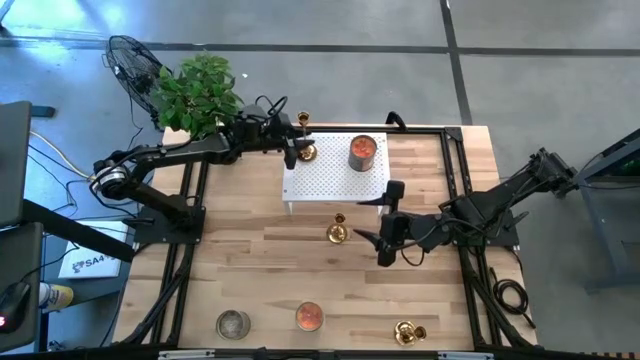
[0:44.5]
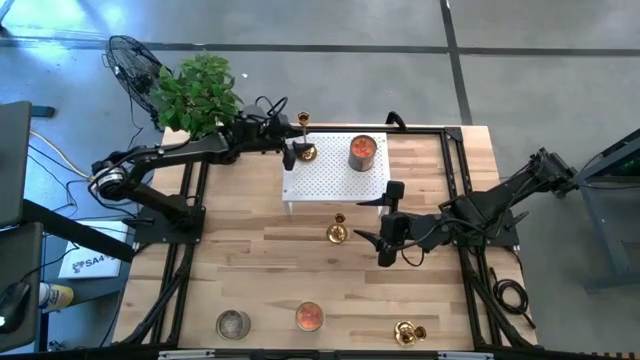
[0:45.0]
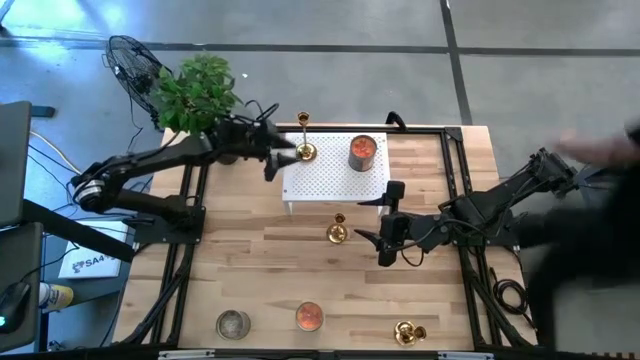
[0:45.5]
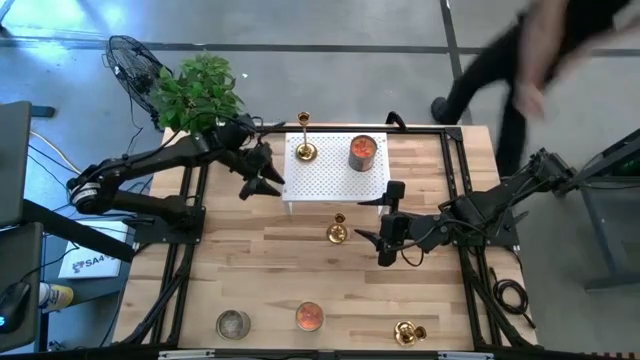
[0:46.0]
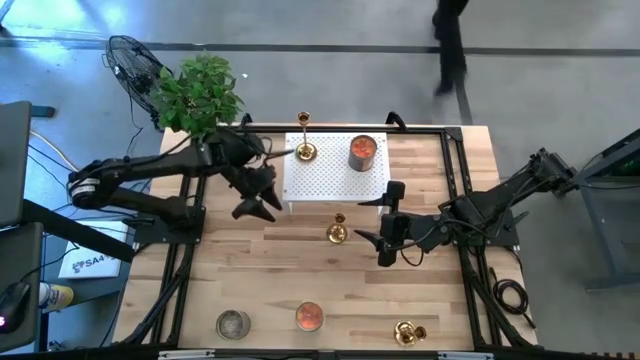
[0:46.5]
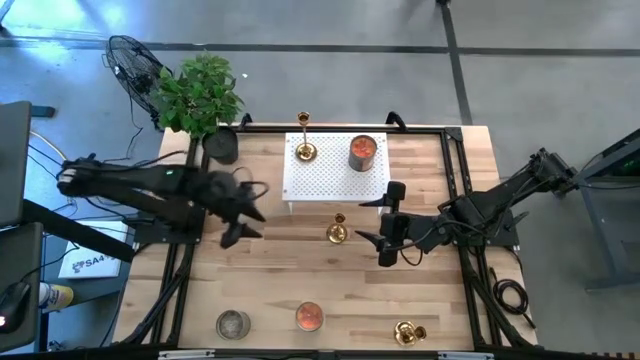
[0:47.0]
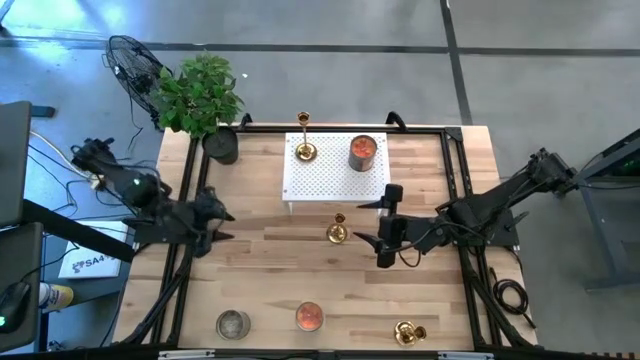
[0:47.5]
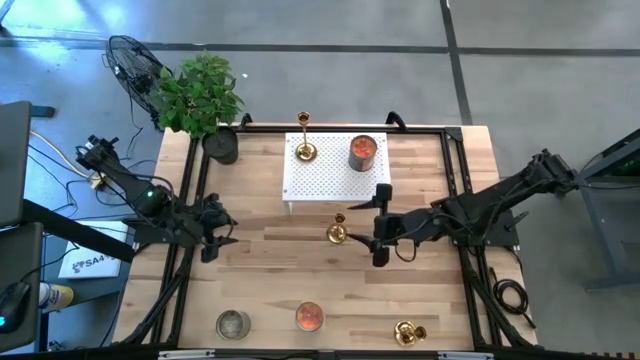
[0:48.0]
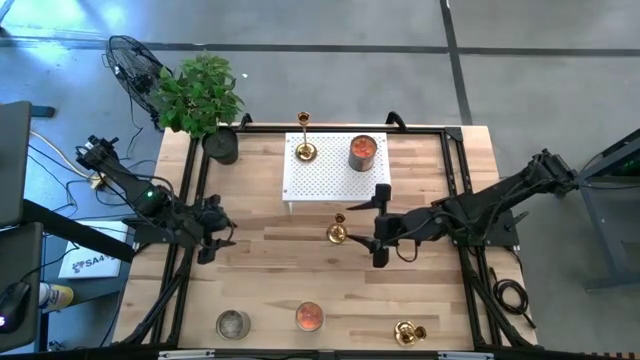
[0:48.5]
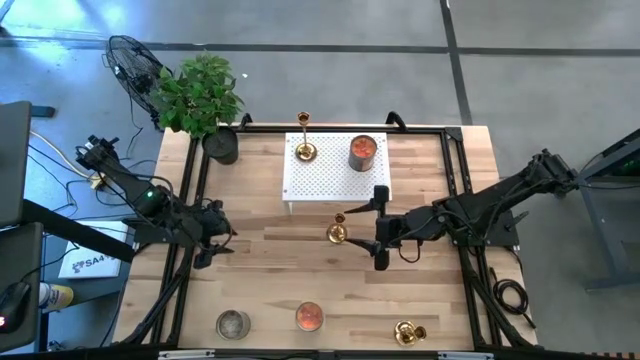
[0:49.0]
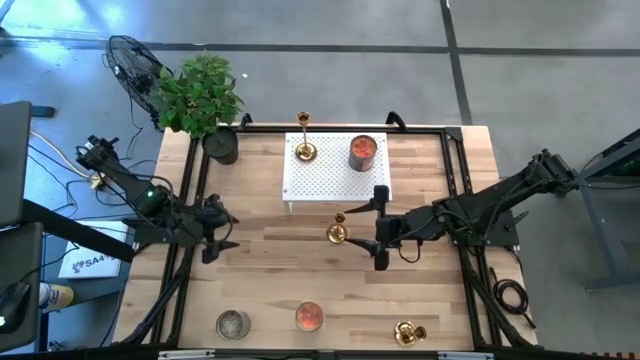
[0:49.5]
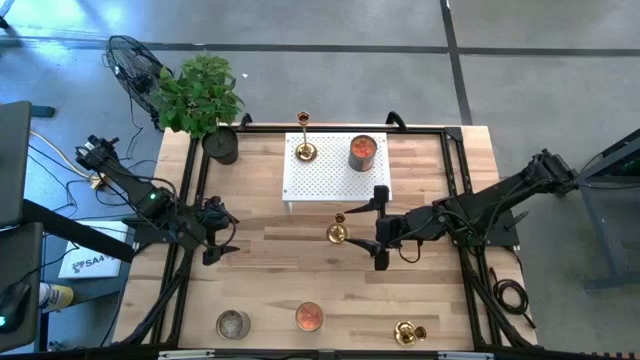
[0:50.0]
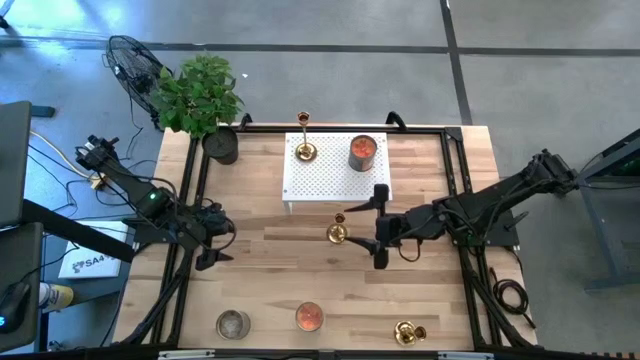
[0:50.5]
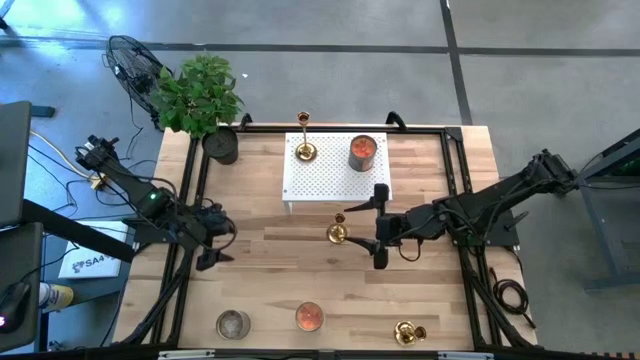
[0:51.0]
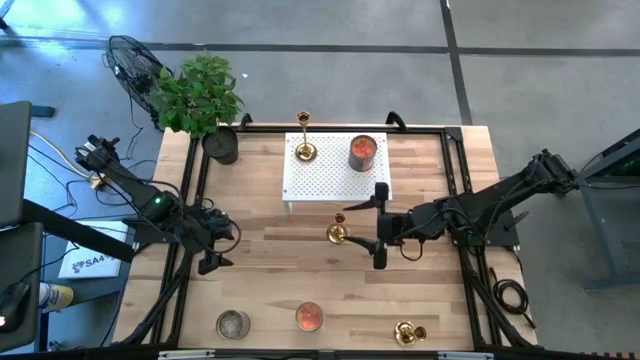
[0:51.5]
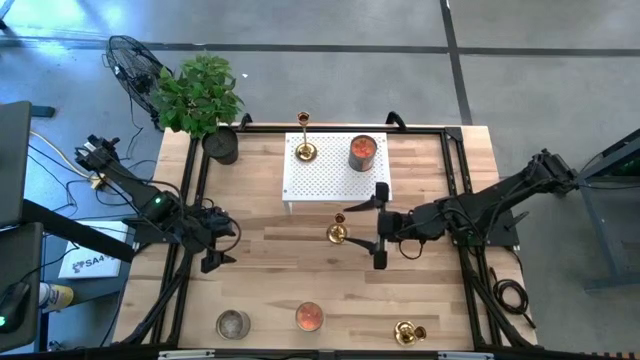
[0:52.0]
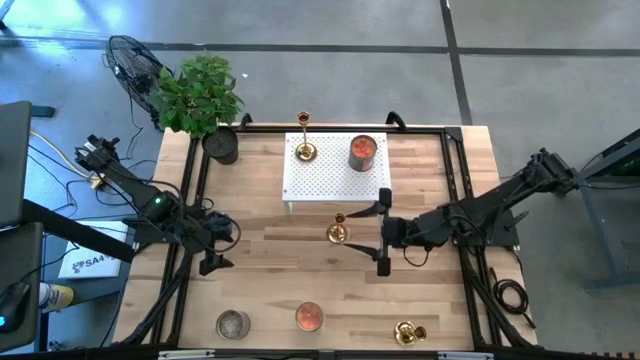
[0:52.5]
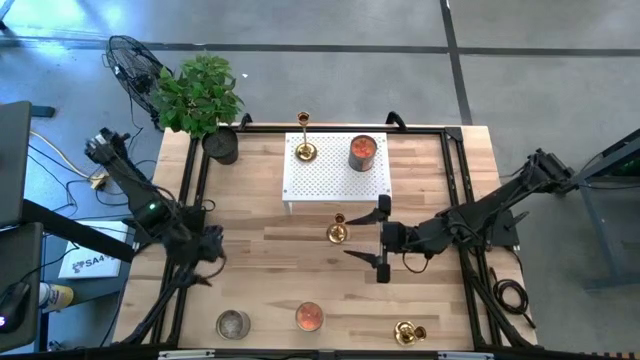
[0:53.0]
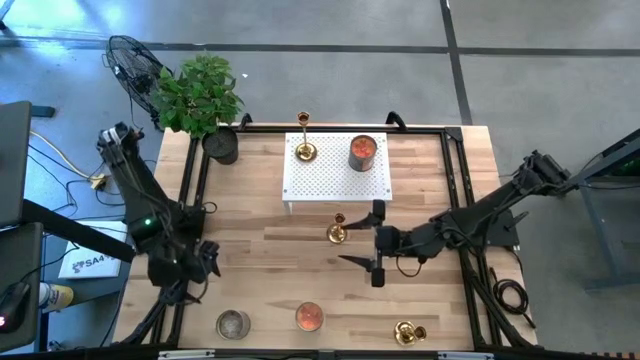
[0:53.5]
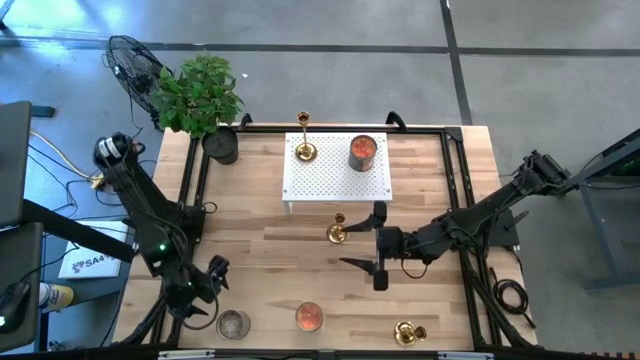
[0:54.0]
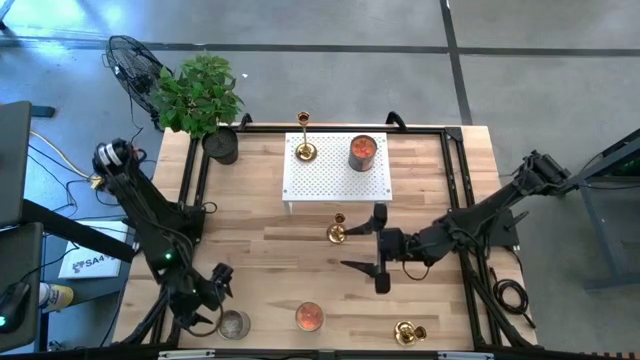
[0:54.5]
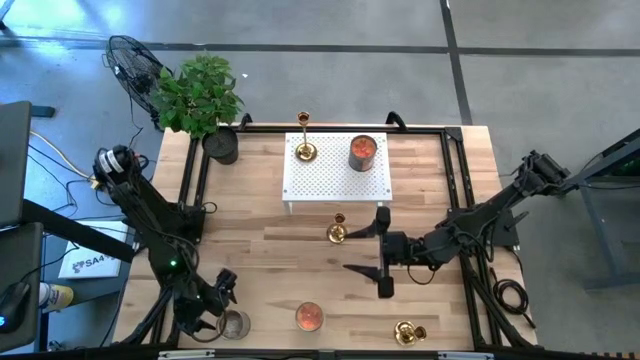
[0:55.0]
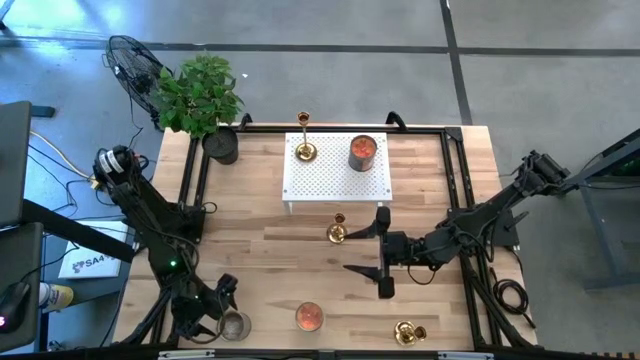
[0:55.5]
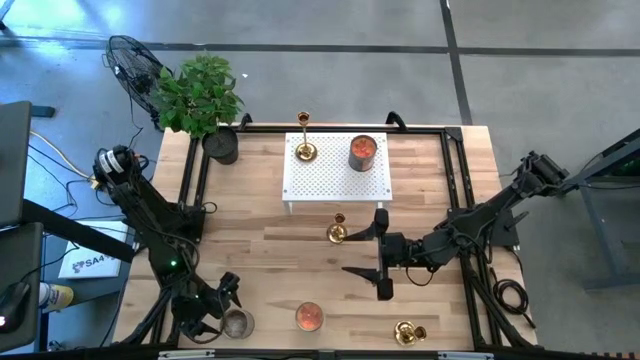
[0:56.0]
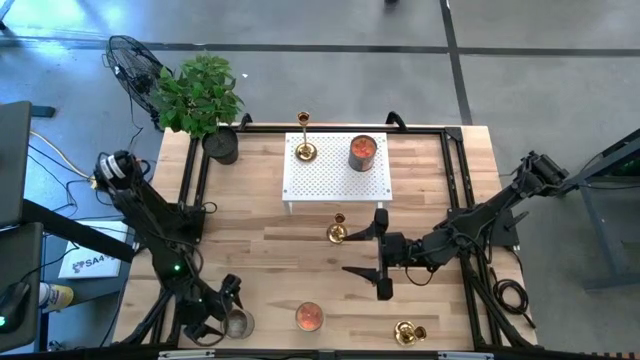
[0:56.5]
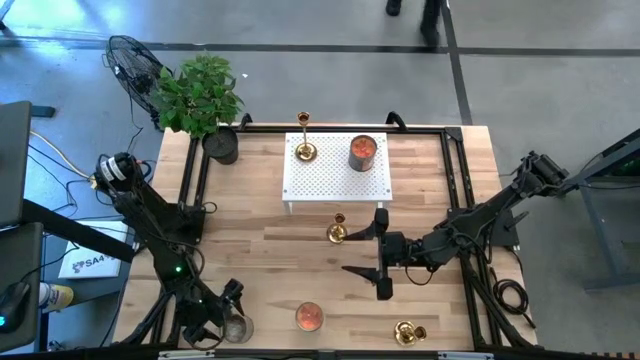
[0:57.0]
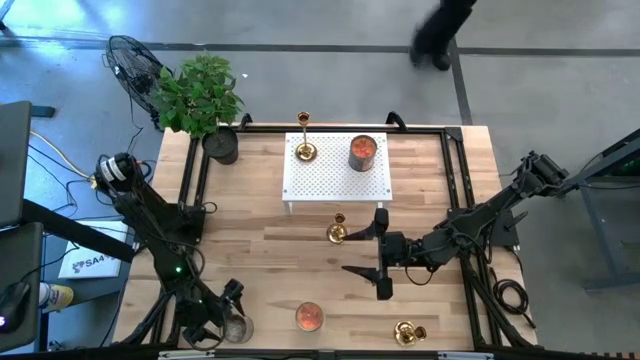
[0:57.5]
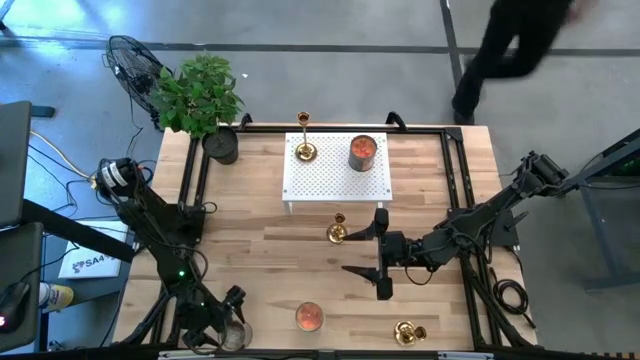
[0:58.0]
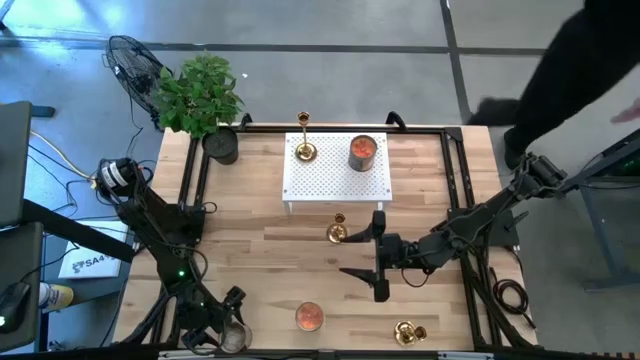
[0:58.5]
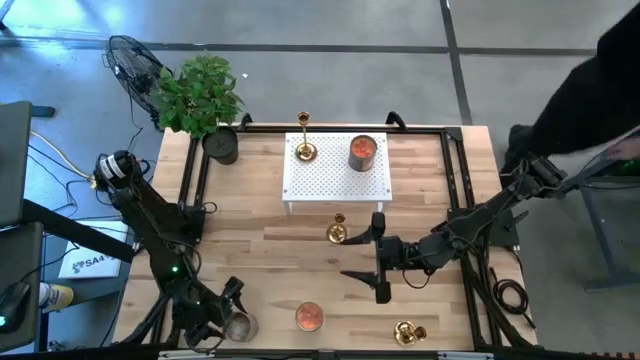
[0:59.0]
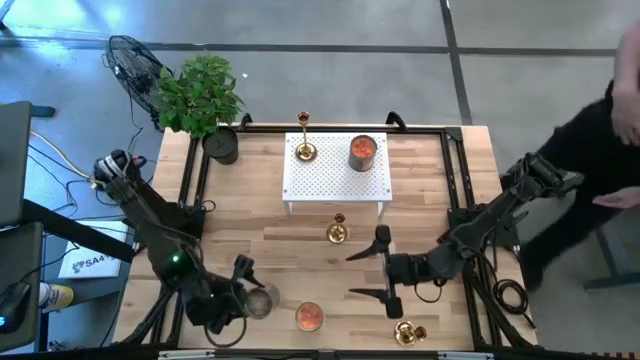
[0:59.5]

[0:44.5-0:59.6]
Task: Pick & Place candle stick holders
Put the brown candle on the shelf

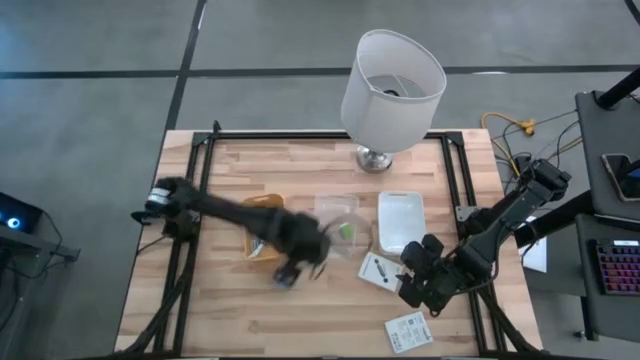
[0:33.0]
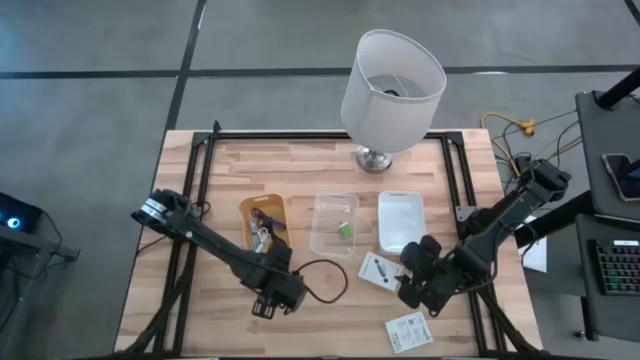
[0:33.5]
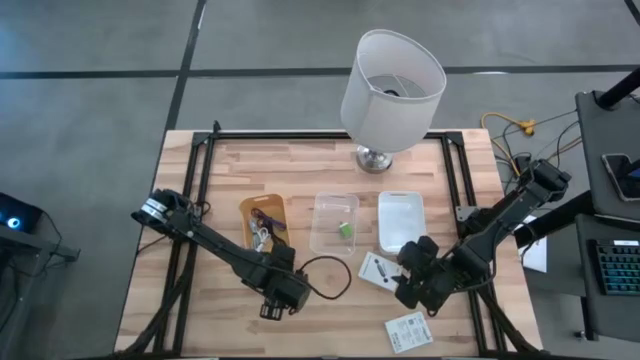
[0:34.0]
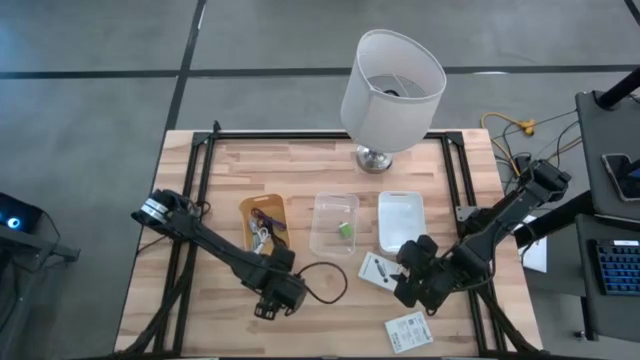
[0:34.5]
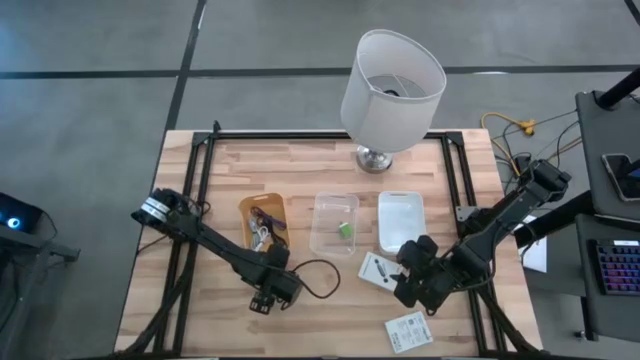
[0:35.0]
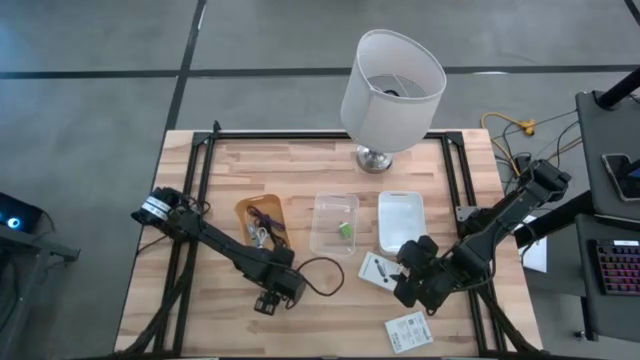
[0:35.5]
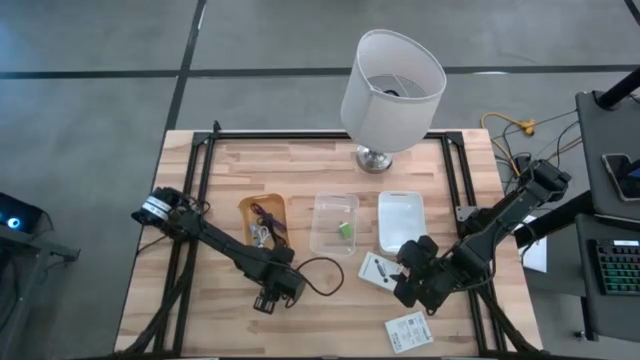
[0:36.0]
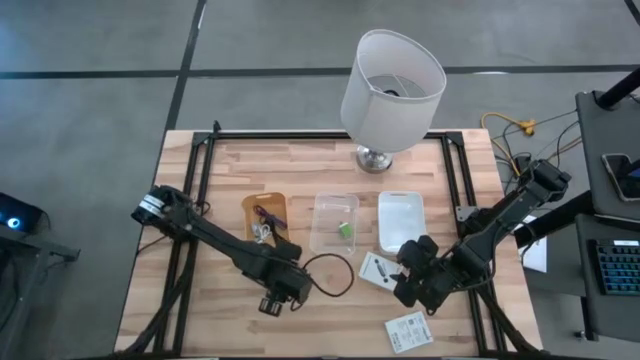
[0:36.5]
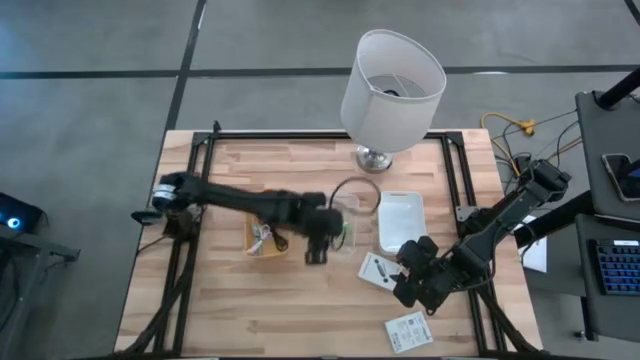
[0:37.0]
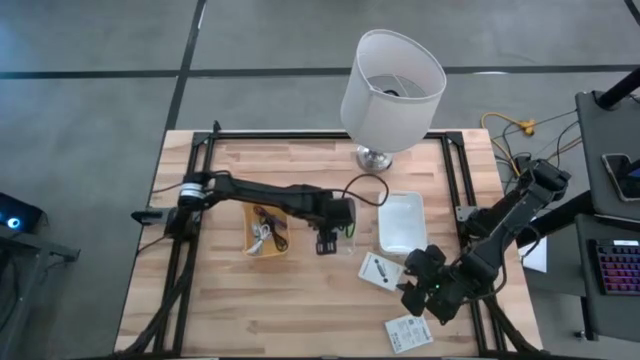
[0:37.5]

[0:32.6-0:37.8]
Task: Pick and place items into bin
Put the white charger adapter into the transparent bin
